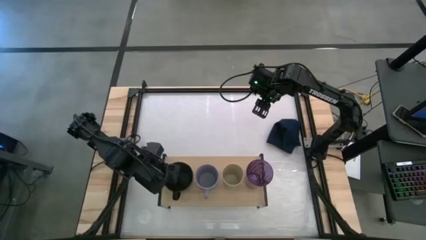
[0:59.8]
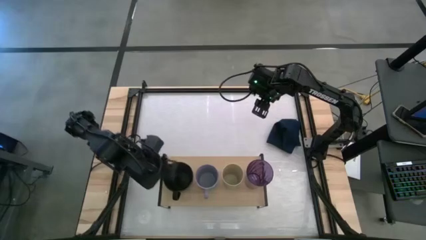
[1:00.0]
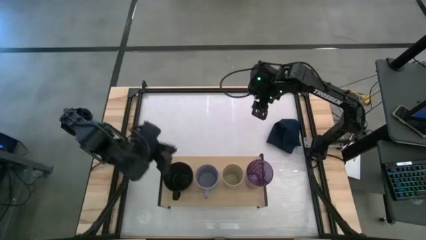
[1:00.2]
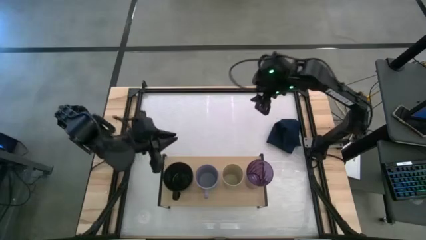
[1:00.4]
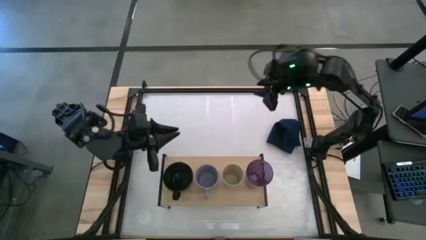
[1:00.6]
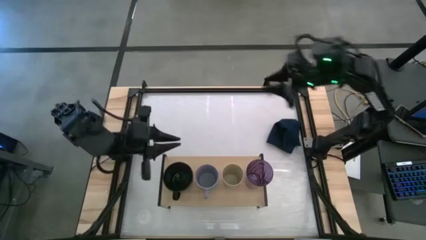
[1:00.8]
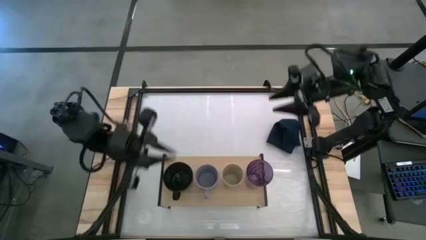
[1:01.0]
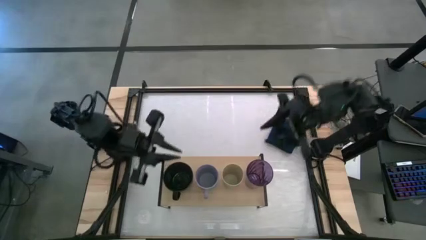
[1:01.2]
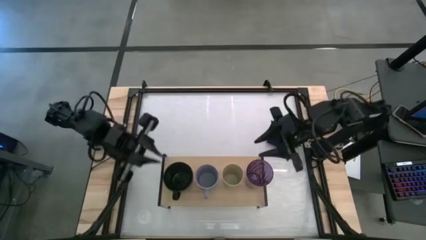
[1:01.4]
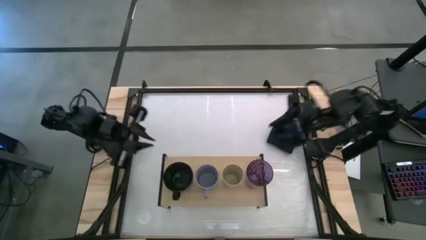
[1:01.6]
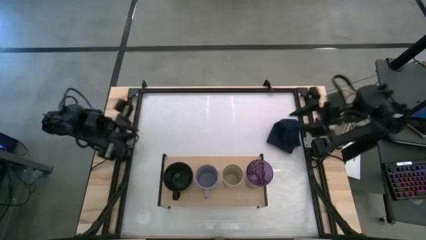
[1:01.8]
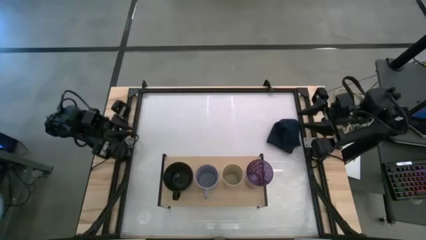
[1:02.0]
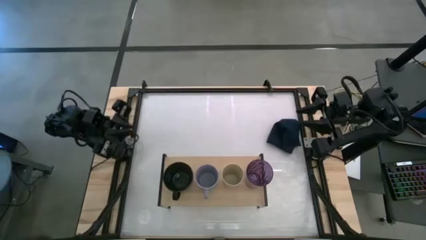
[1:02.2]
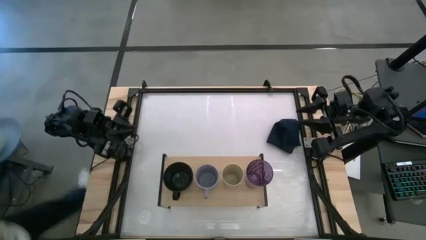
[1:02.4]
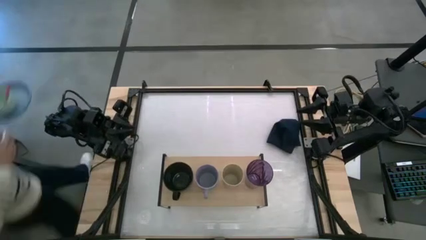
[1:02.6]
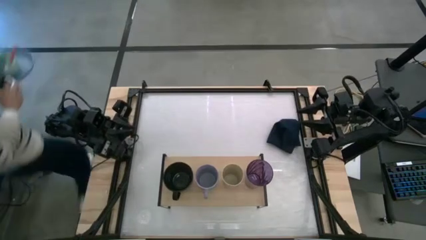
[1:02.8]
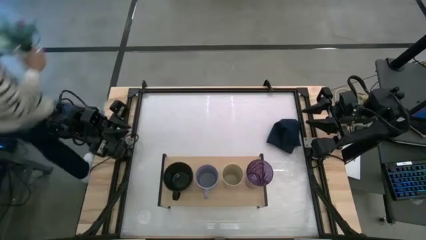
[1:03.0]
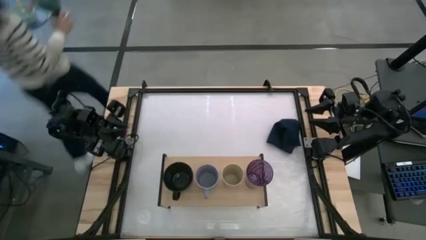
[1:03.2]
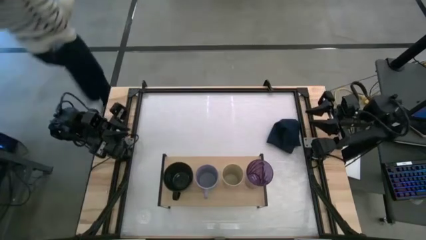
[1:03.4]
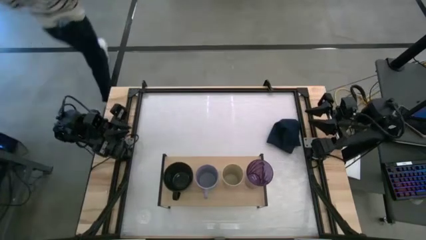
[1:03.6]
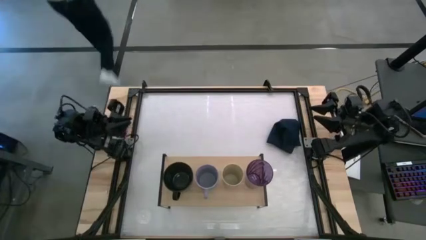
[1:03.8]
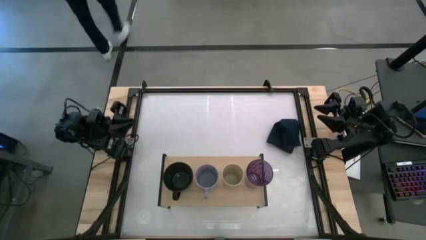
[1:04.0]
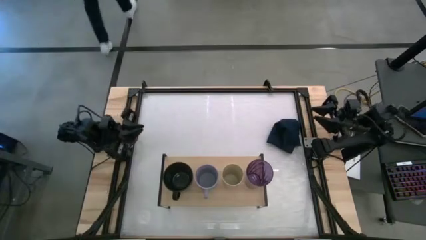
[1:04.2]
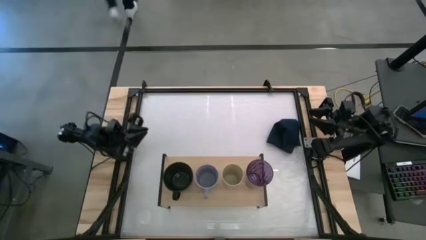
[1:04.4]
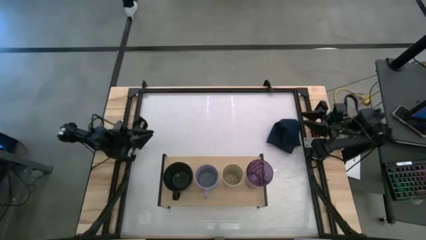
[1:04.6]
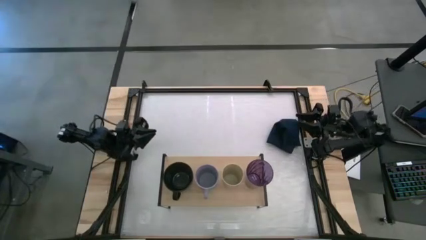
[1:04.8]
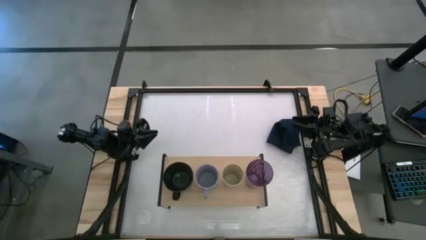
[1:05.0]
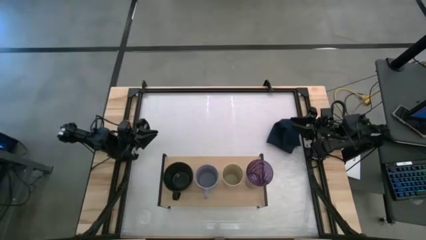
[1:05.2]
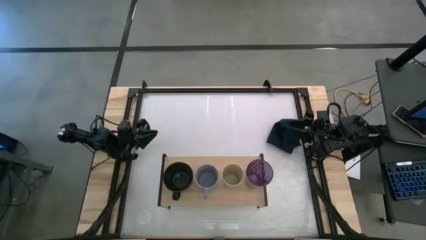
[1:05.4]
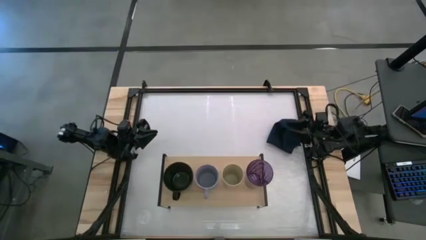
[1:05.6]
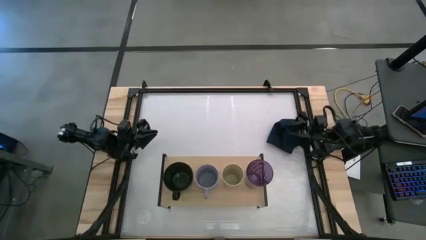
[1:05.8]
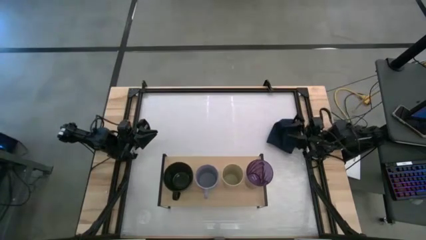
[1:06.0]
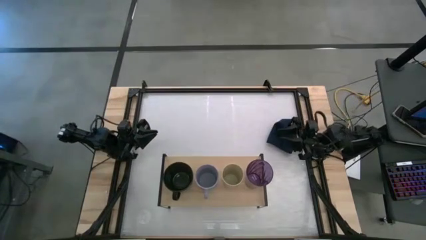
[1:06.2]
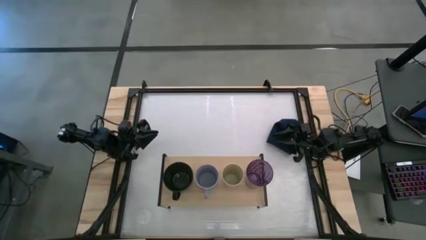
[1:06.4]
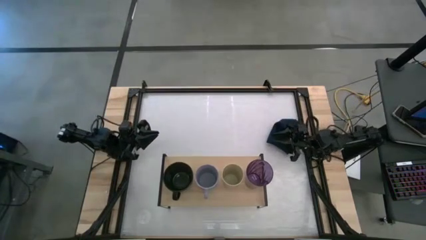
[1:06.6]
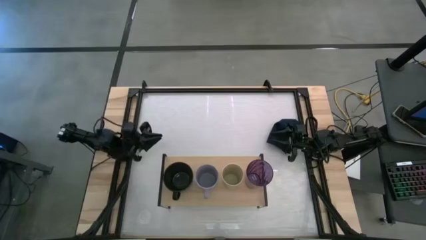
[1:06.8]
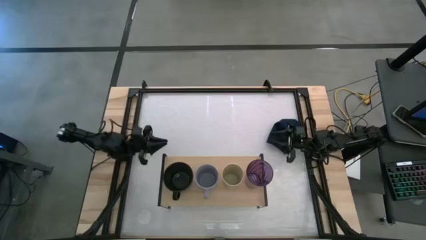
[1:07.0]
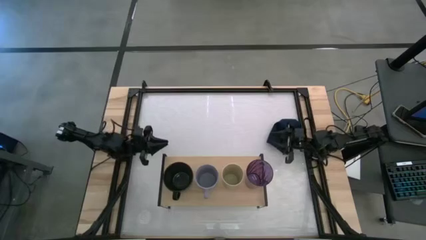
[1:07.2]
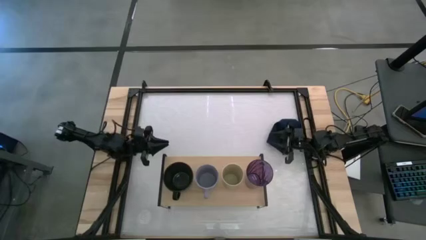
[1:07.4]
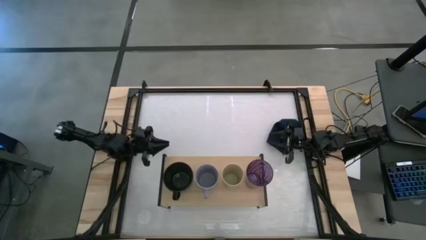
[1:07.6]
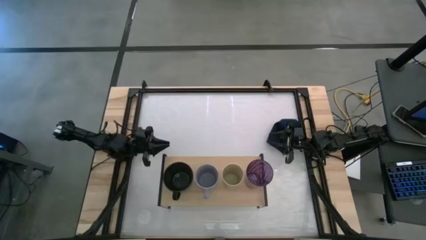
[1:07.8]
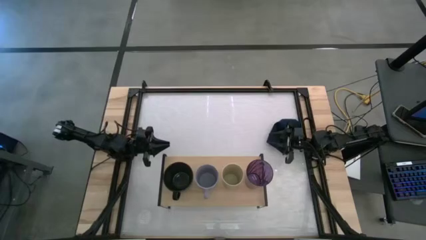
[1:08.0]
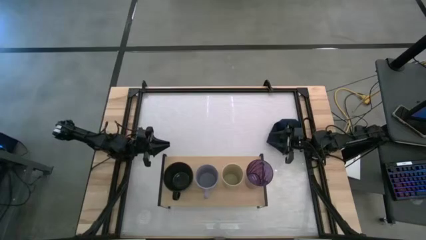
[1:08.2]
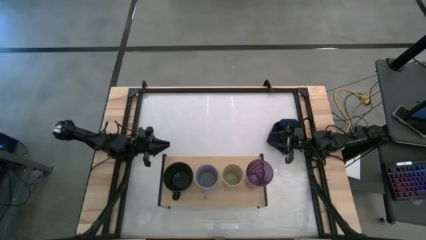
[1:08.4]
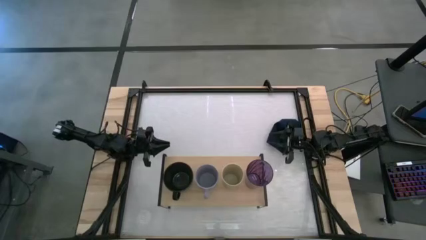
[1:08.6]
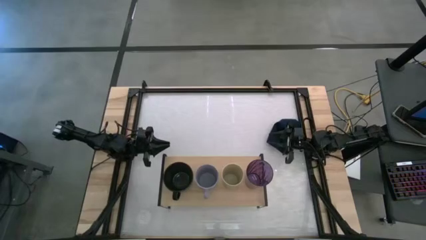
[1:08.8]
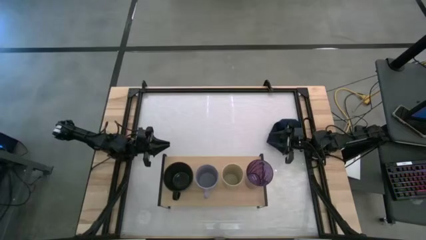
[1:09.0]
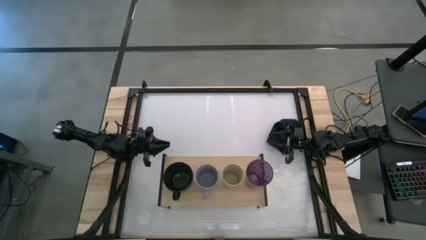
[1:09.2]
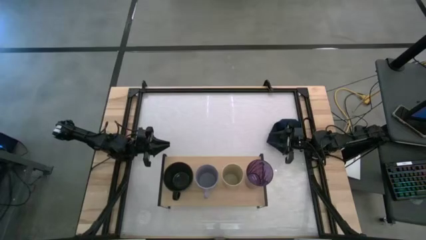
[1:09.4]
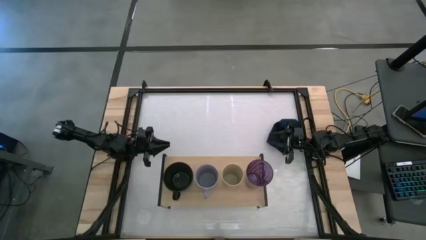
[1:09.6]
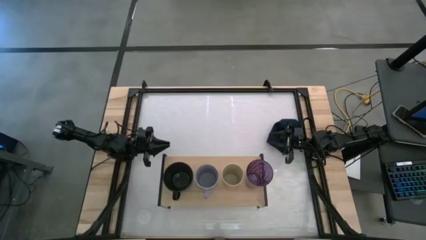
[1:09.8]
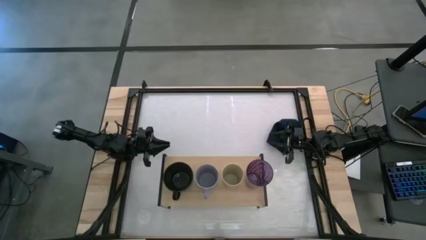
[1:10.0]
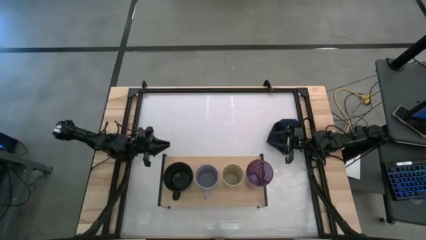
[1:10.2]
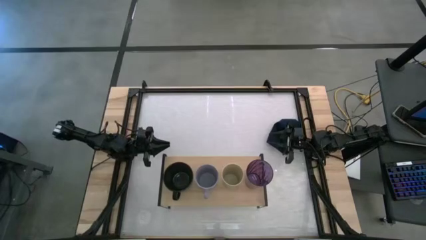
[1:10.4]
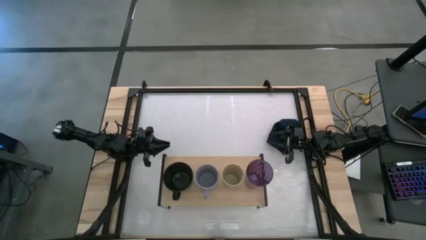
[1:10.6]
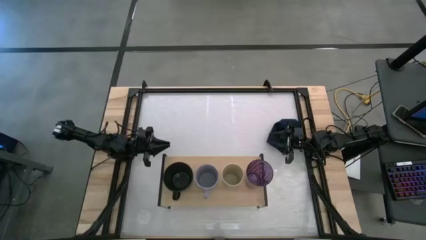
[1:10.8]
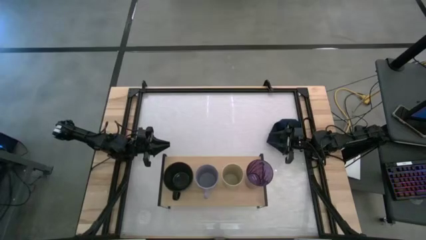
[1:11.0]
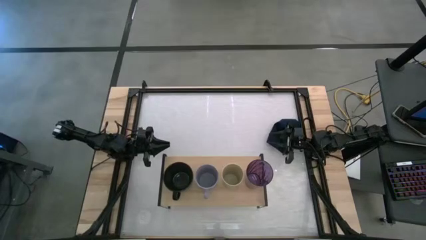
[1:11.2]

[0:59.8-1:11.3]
Task: Stack small to large cups/mugs on shelf
Return to Home Position

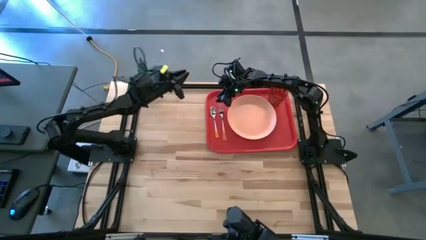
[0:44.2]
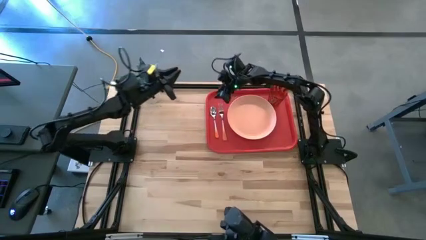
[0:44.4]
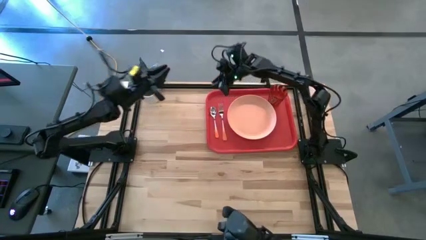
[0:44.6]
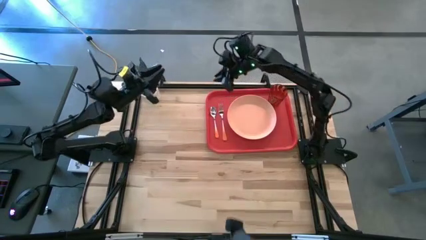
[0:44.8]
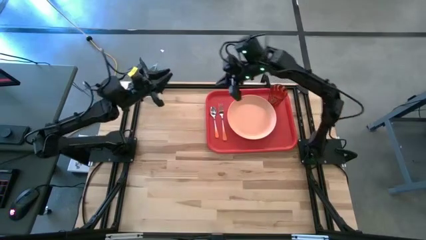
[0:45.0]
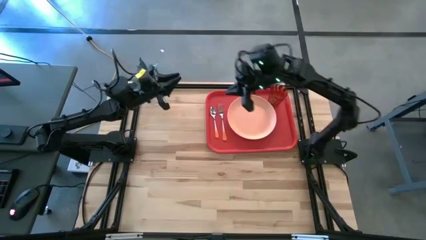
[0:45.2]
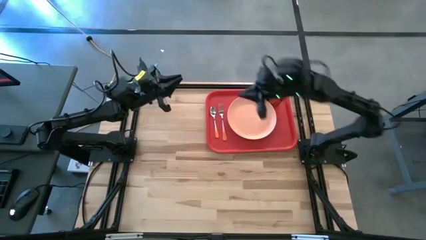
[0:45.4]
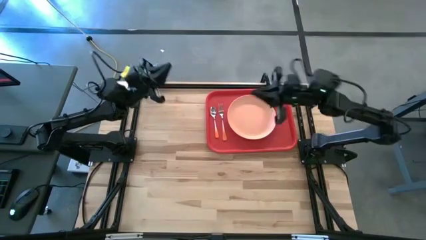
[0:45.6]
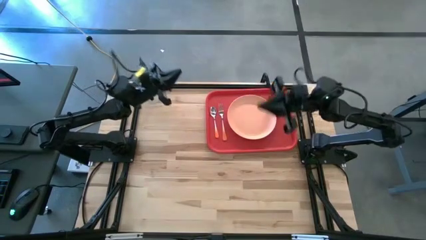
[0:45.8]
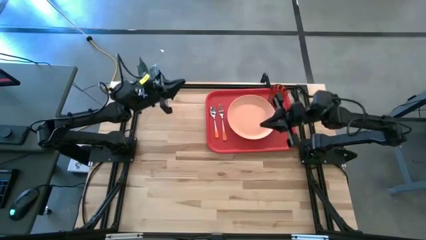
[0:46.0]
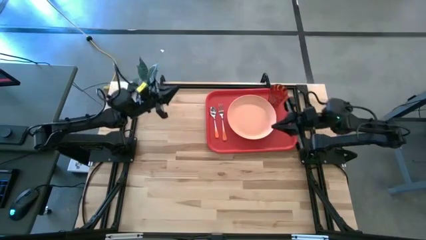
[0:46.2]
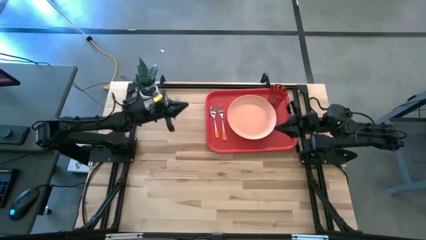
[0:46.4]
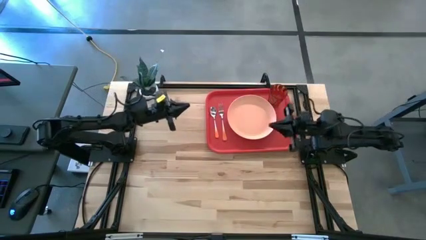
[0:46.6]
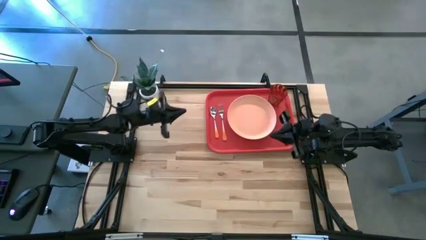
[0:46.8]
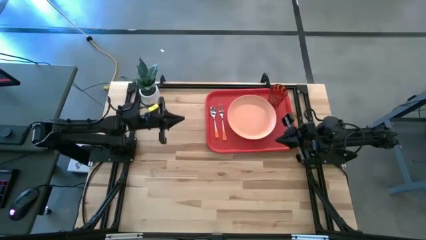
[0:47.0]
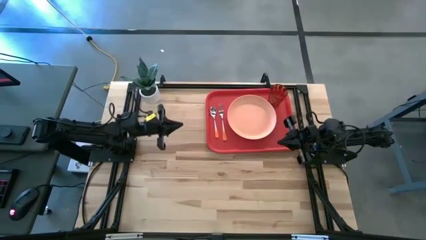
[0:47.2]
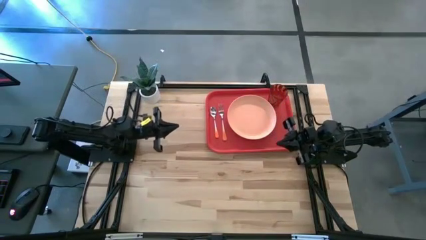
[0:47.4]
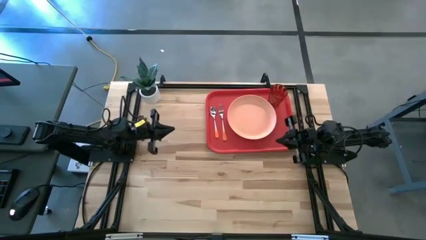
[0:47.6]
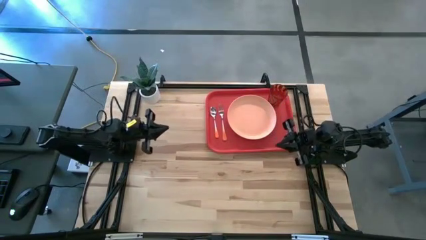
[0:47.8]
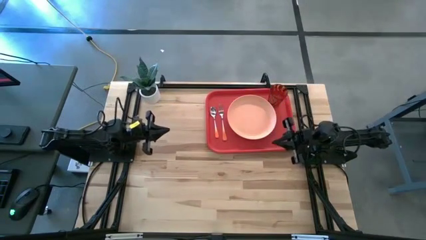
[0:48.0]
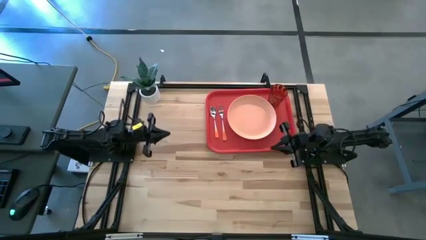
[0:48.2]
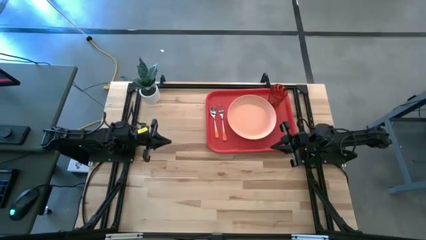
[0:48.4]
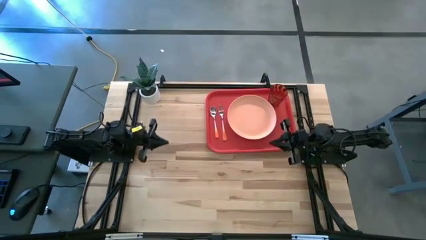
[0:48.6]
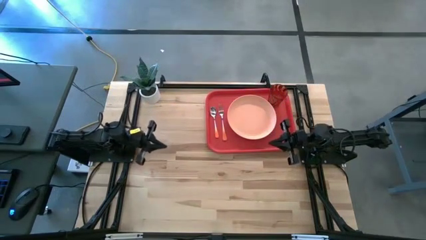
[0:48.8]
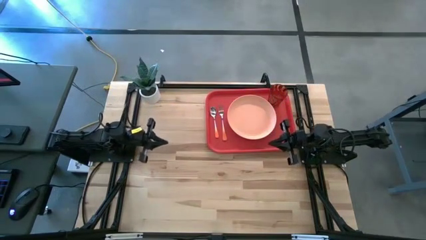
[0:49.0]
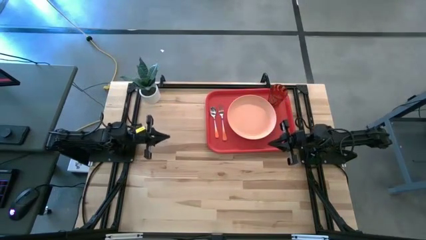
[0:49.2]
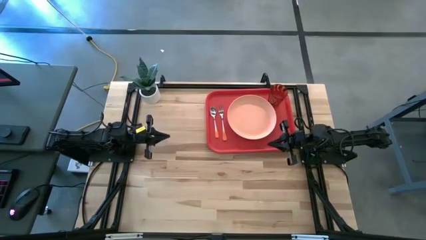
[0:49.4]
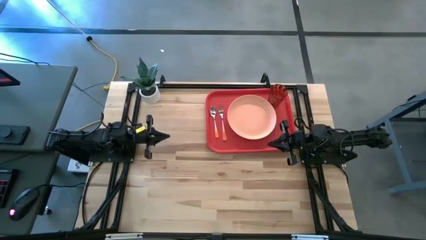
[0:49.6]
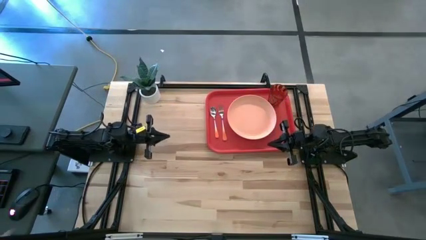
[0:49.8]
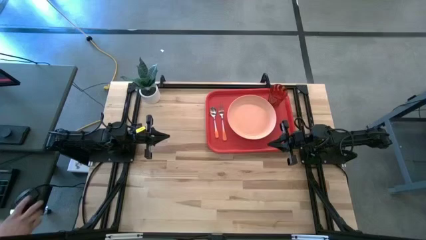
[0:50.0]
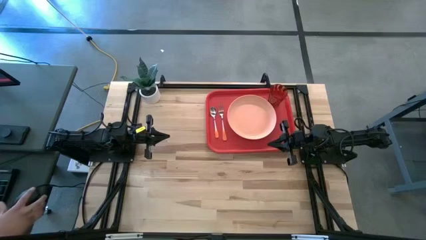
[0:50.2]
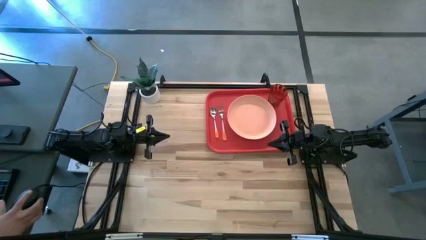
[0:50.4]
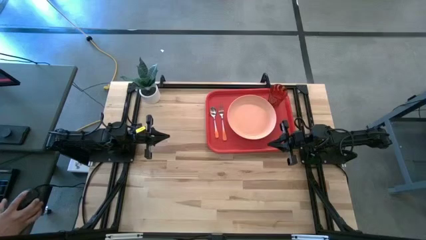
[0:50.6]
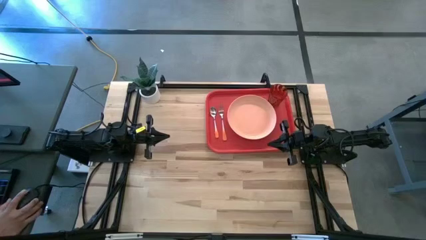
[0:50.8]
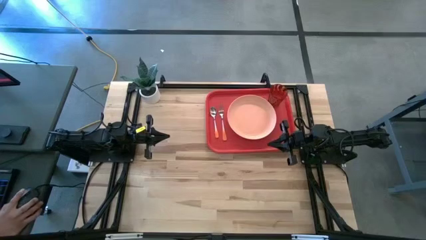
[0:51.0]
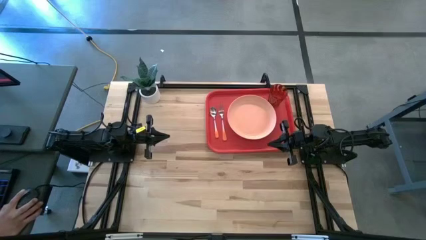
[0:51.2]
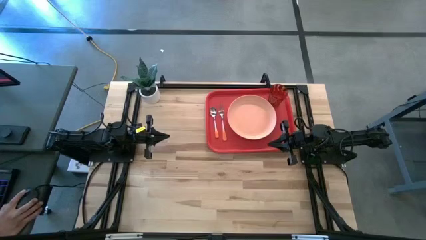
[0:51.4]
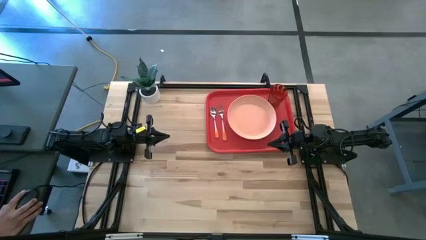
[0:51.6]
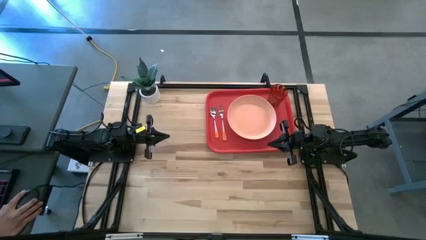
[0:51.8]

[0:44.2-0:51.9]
Task: Pick and place plate/cup/fork/spoon on tray
Return to Home Position
